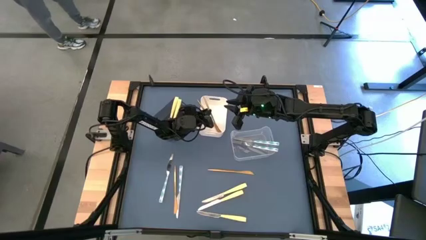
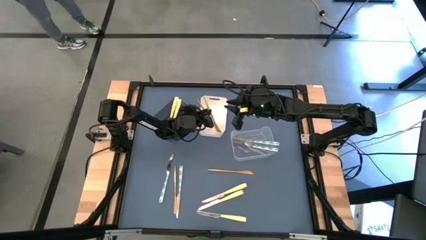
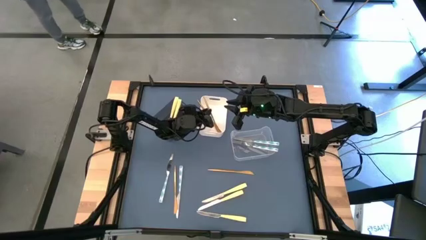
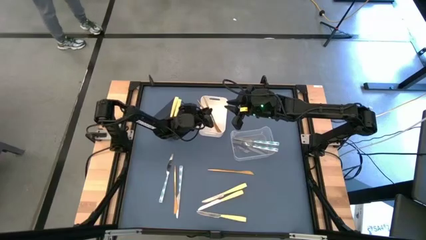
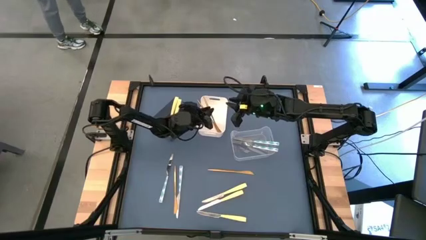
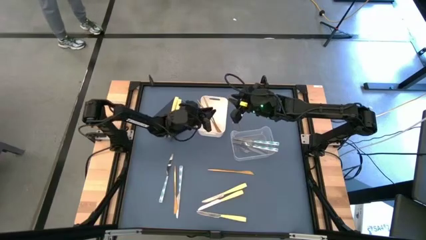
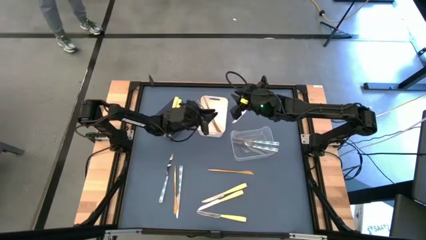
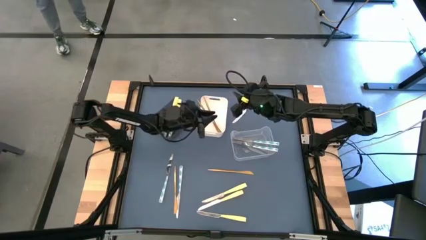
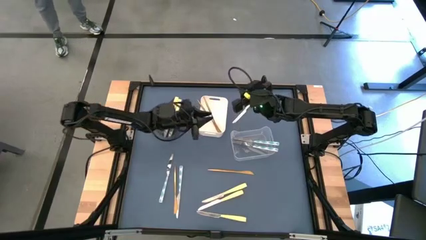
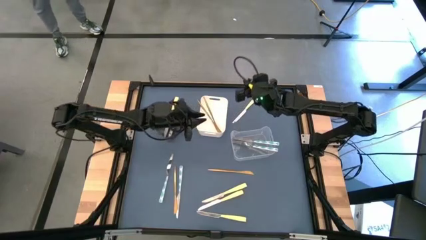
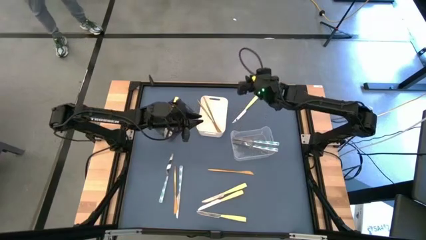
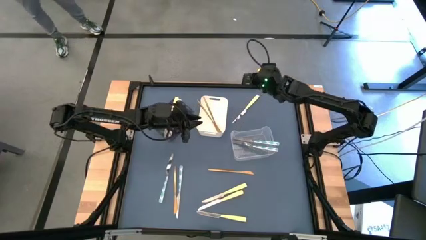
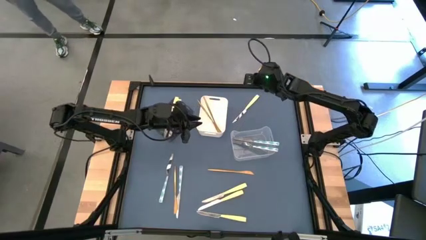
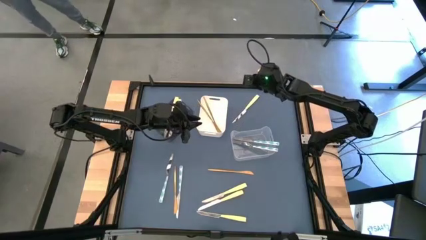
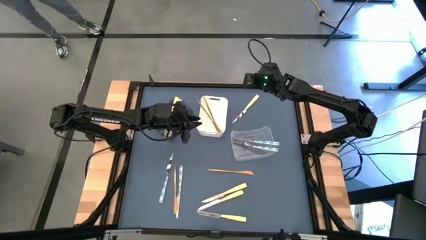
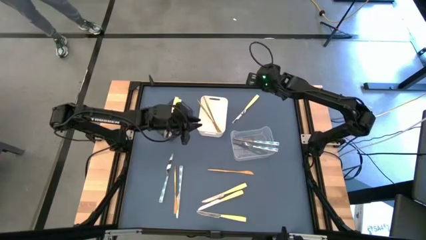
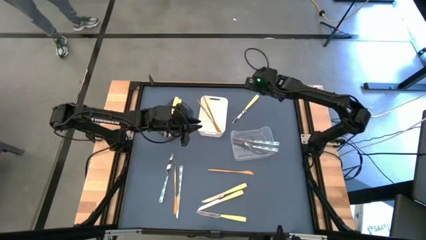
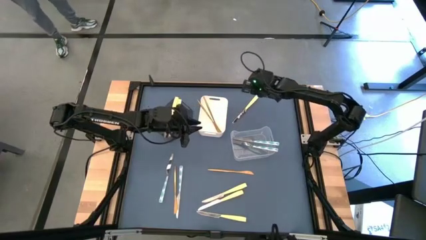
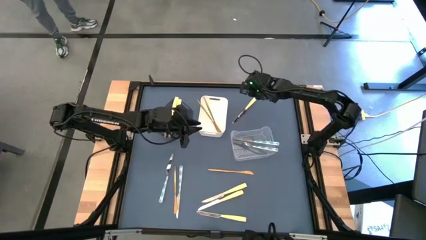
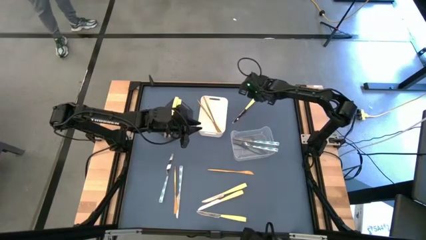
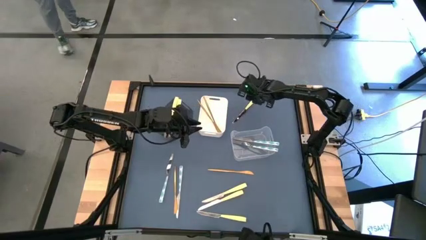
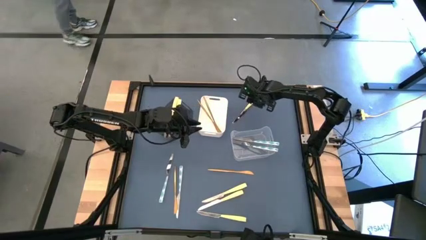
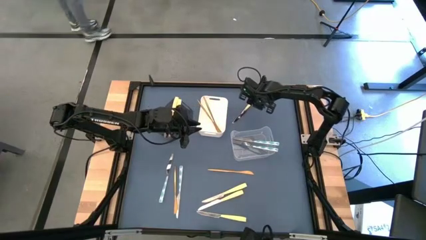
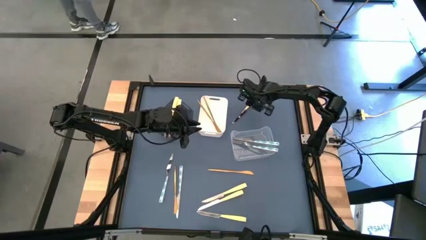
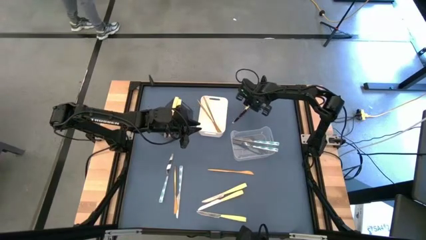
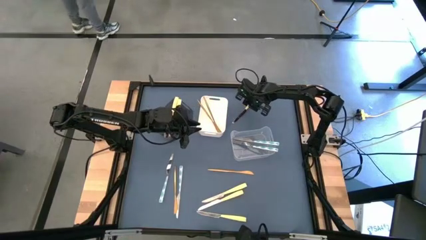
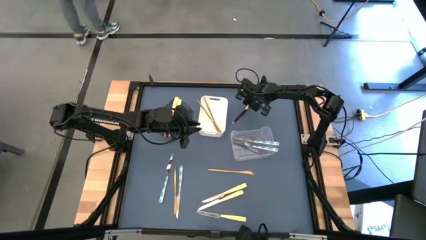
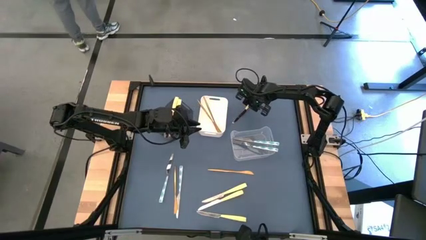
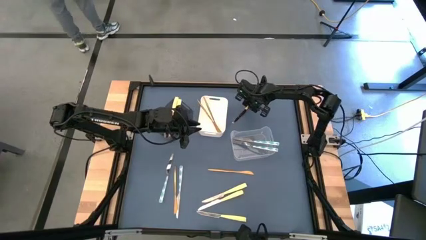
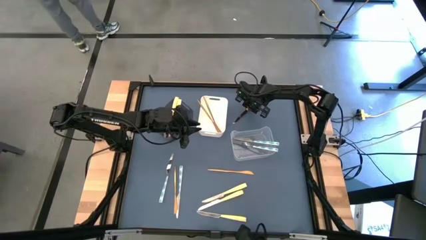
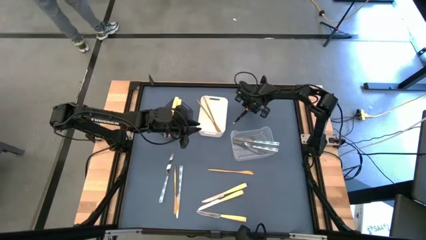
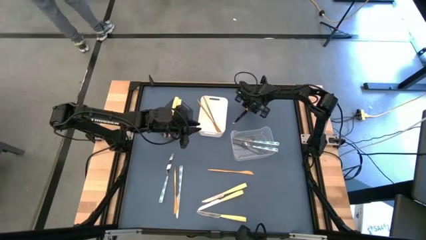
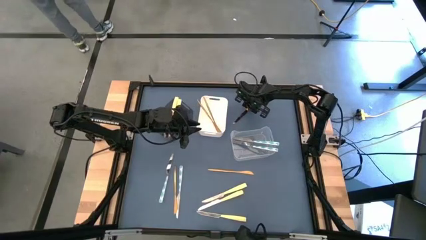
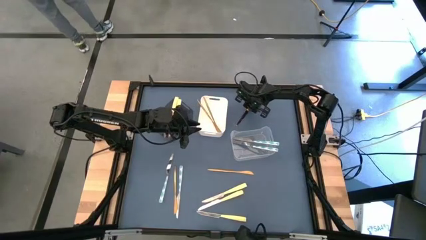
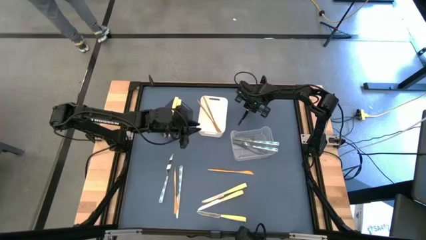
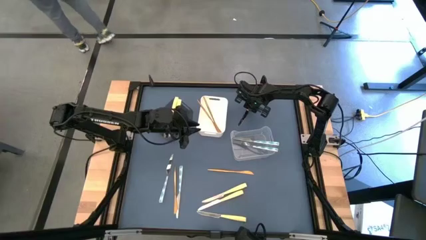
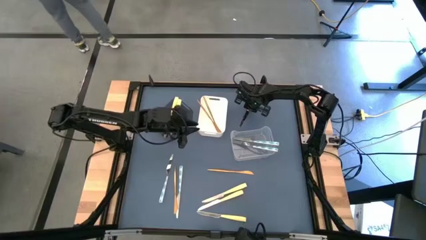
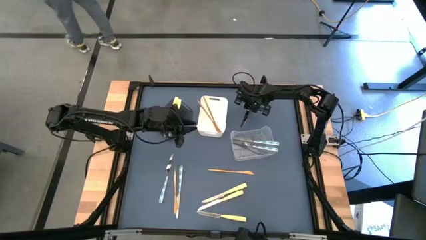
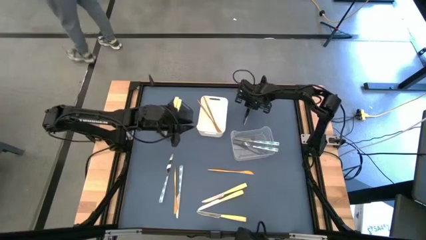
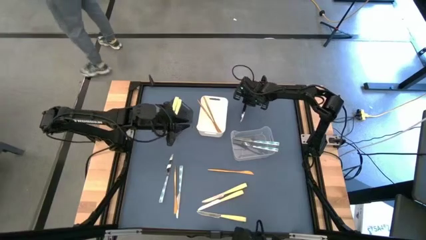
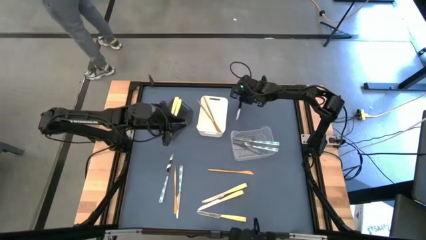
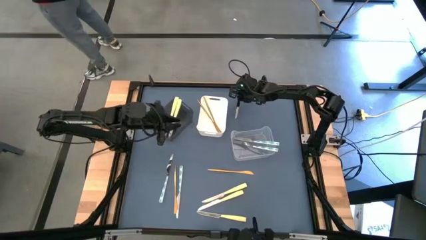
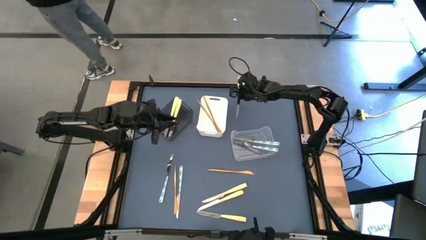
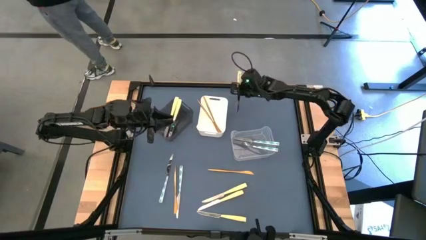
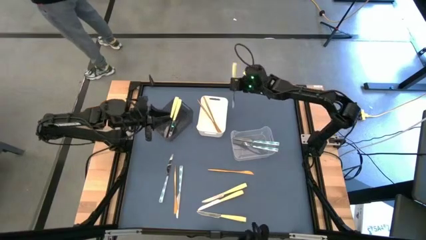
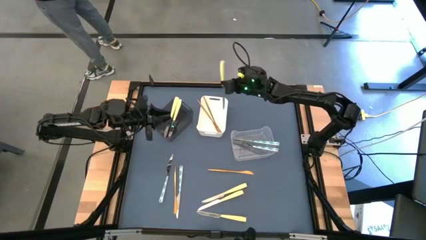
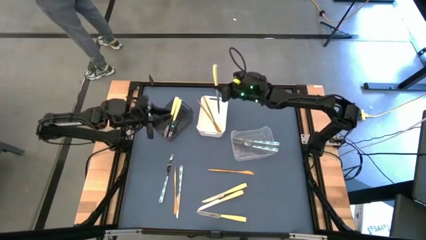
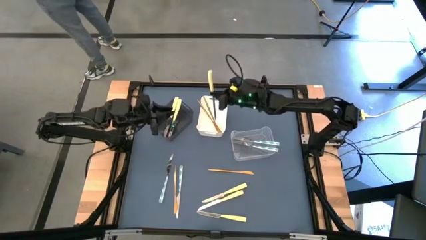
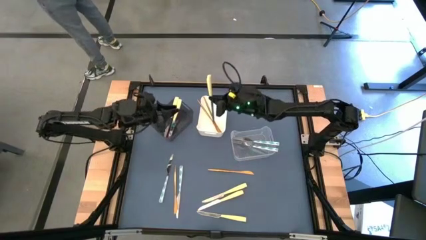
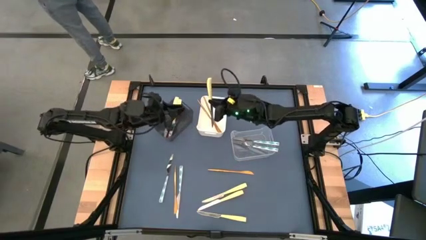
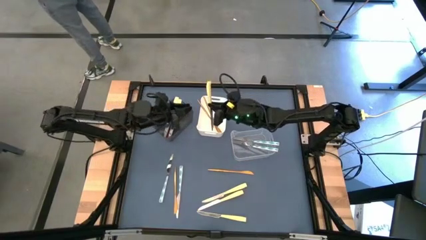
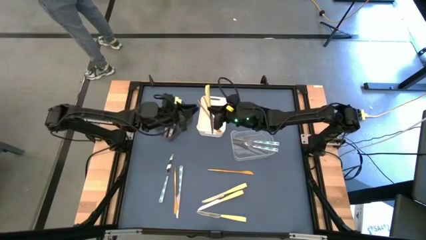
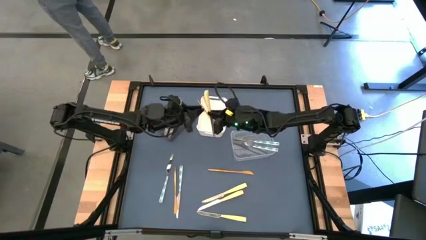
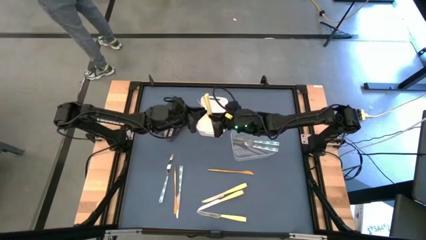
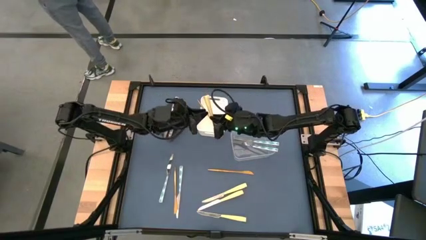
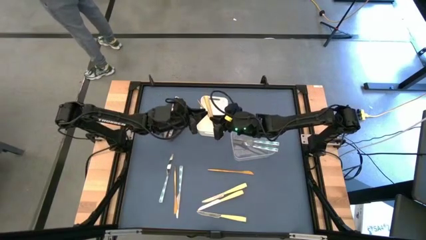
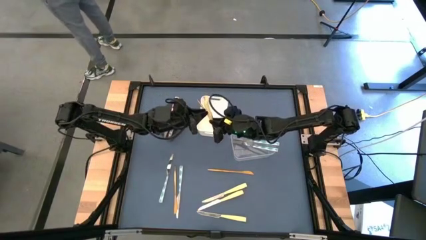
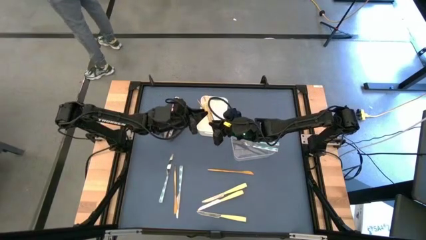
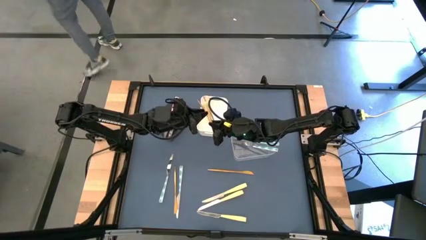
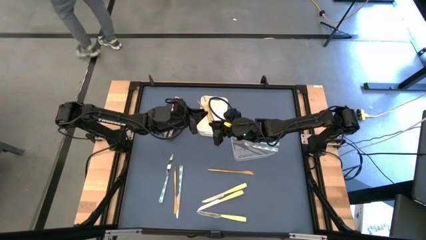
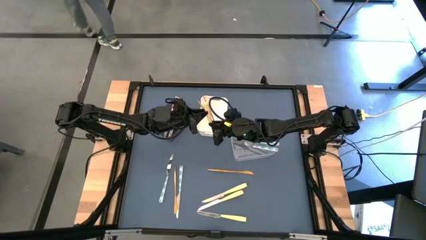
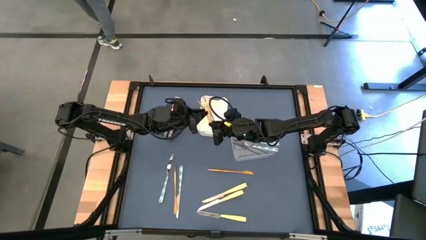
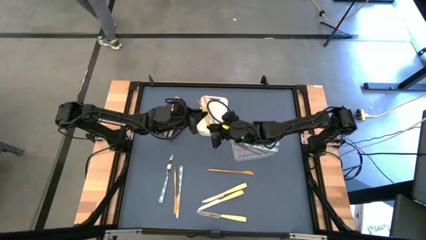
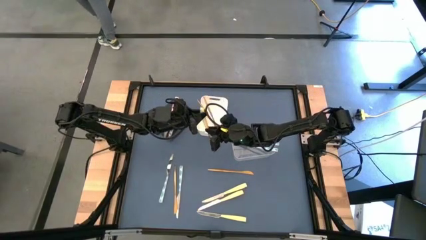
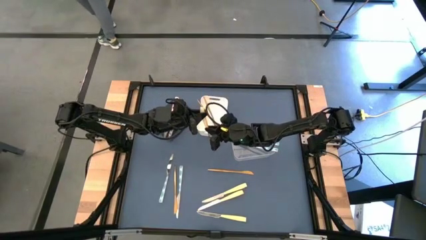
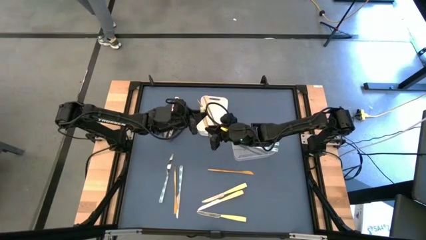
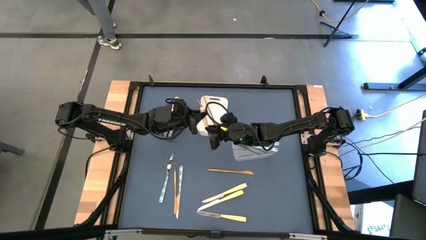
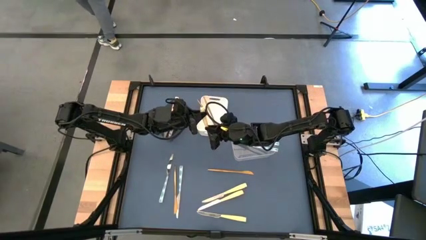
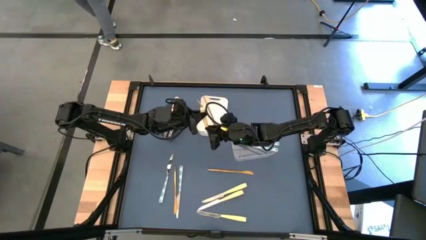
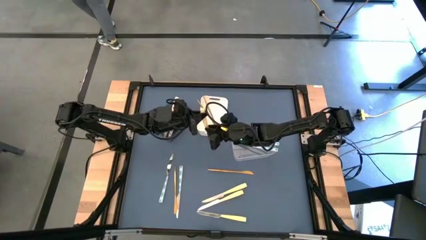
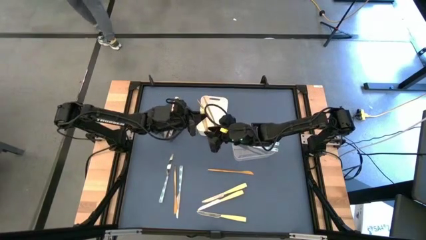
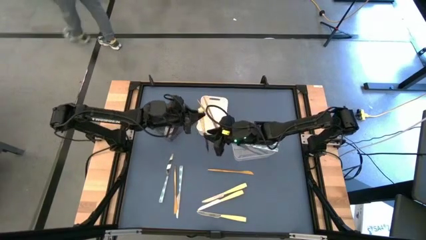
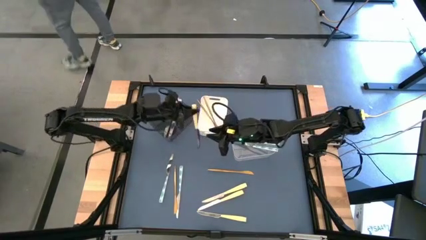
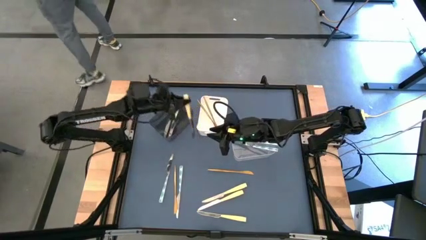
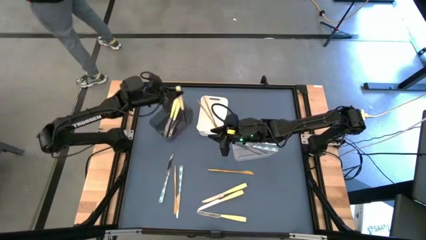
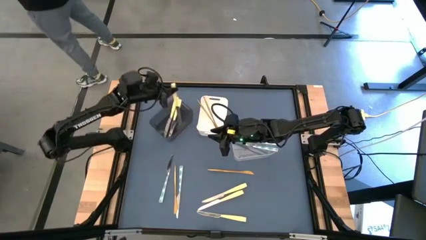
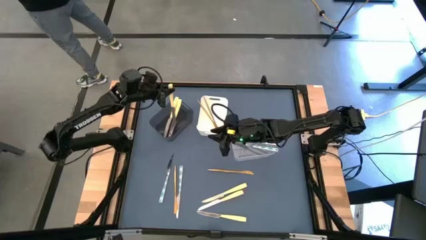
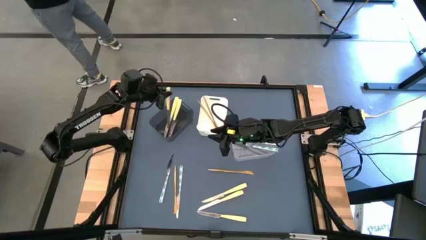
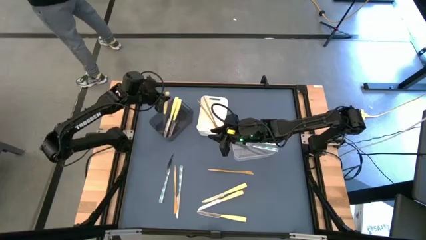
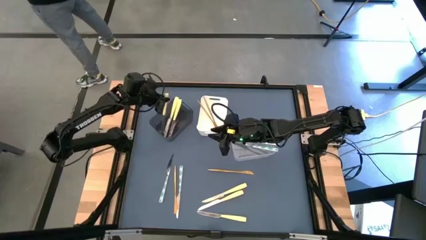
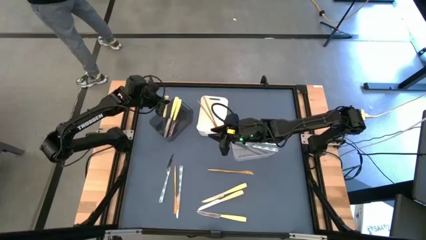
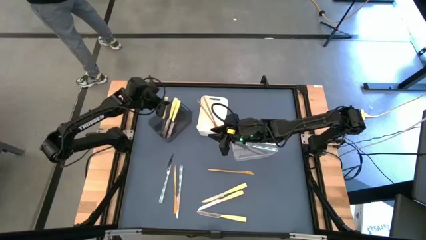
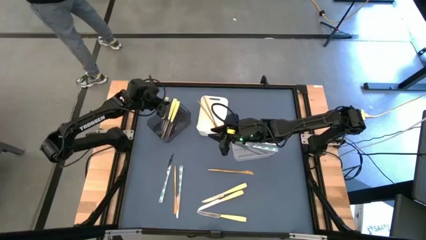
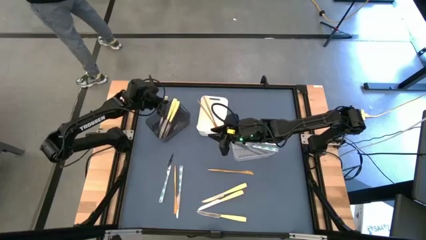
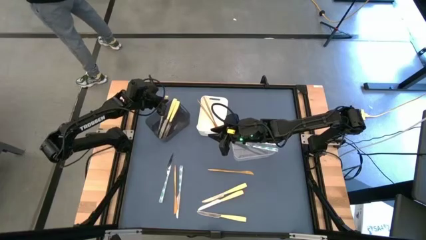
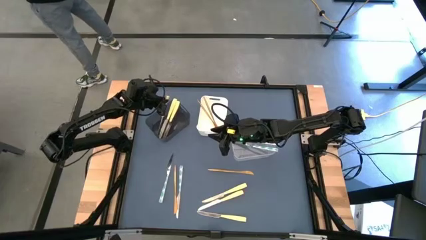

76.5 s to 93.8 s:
Task: Sort silverware by color (type)
Put the yellow knife into the black bin
